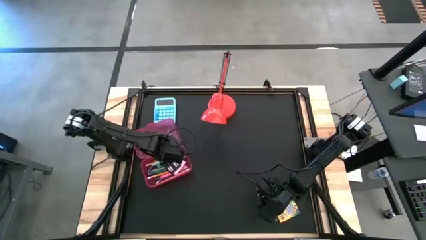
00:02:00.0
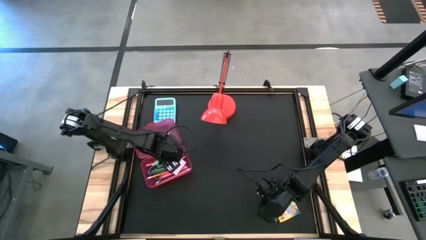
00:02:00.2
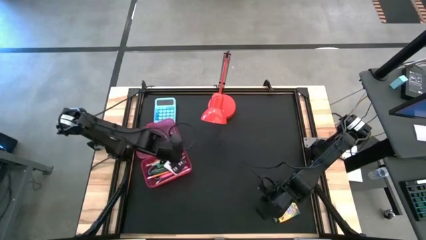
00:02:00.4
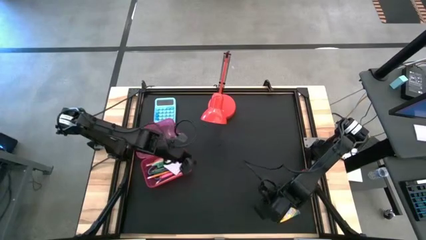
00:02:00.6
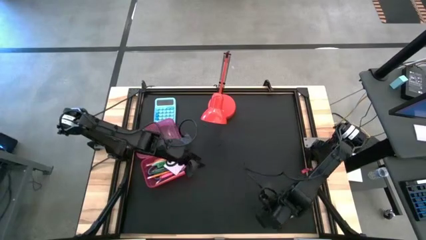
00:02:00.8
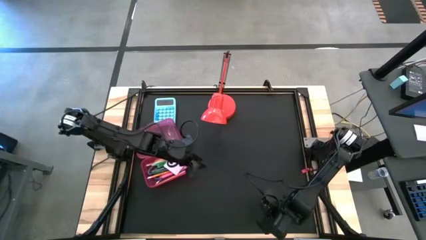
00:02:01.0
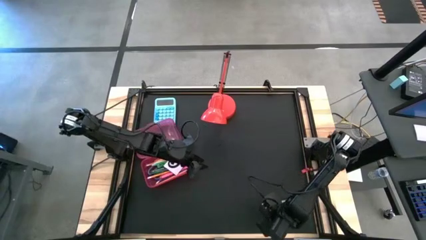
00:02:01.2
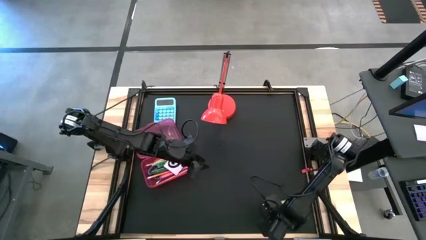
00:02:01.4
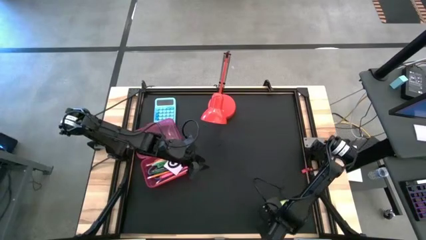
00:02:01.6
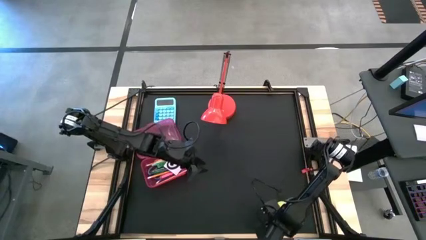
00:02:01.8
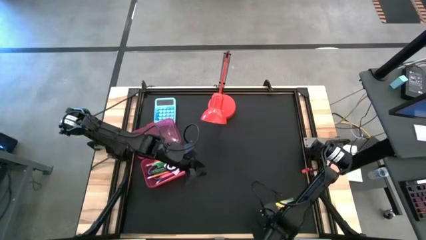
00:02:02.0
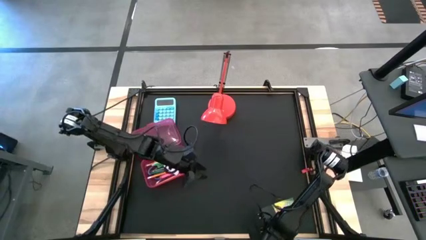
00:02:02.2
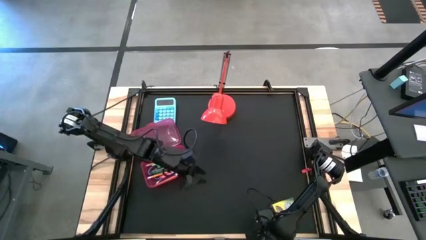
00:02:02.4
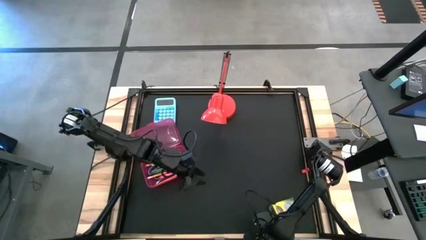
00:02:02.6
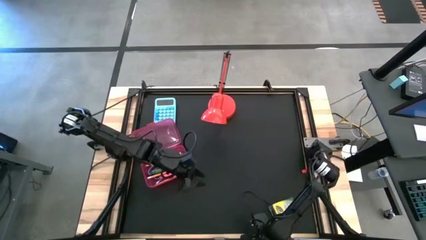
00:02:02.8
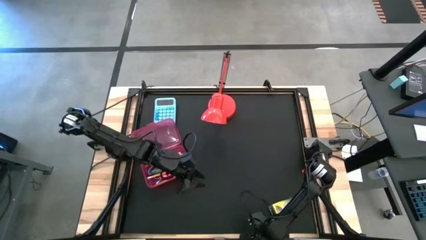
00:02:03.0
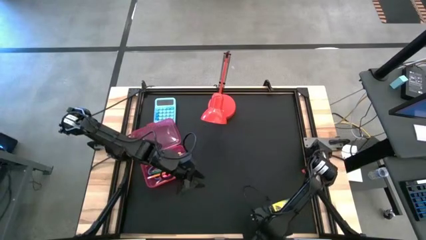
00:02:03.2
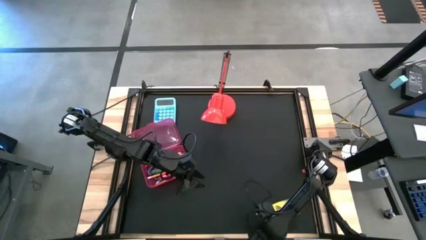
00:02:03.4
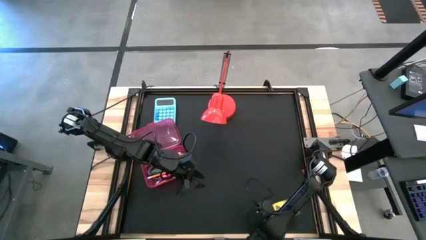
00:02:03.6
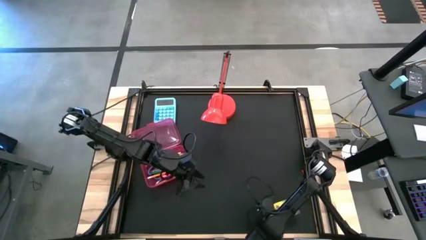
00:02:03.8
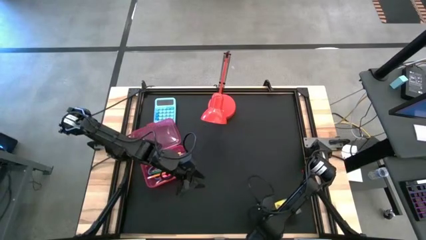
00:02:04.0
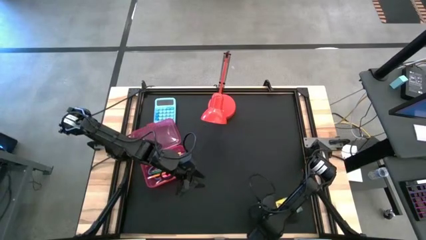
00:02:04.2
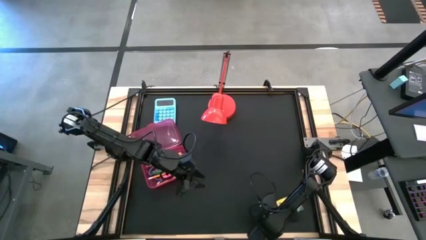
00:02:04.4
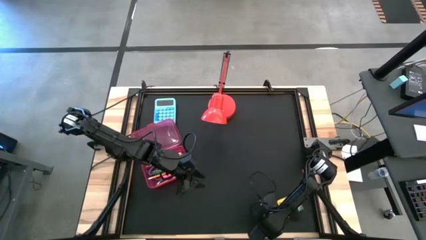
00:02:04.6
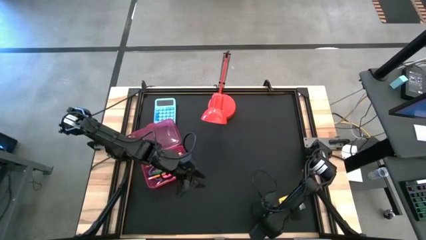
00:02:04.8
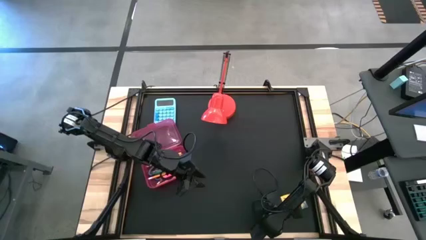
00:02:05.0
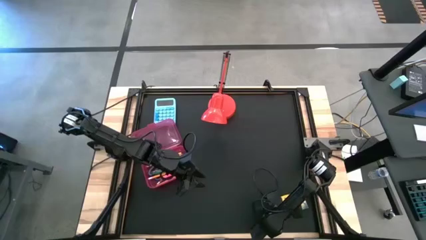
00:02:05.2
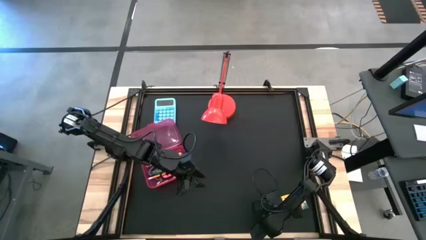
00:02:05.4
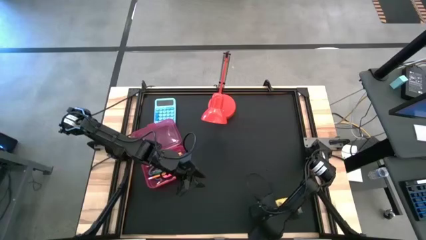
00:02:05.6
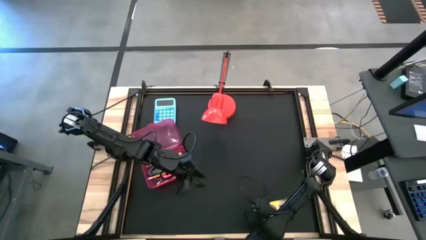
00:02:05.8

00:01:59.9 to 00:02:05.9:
Task: Pack school essentials
Put the yellow crayon box into the red supply box

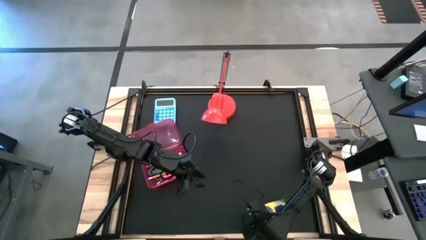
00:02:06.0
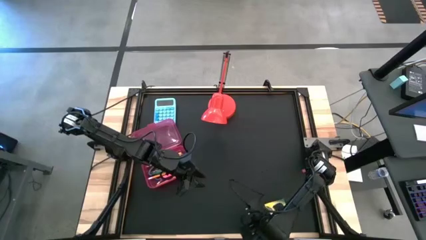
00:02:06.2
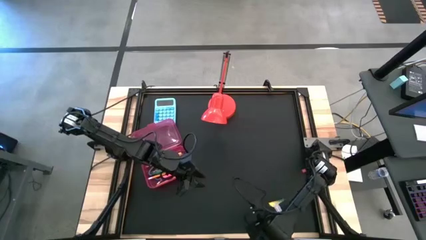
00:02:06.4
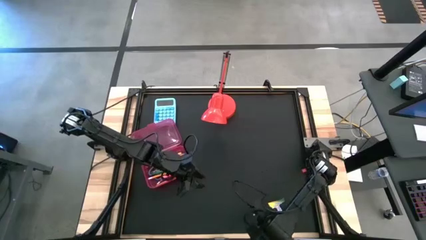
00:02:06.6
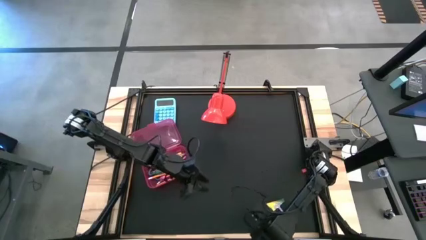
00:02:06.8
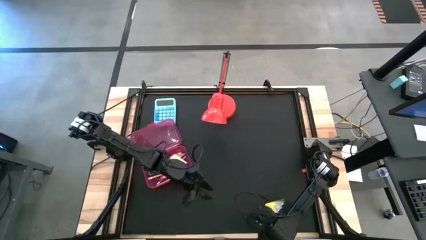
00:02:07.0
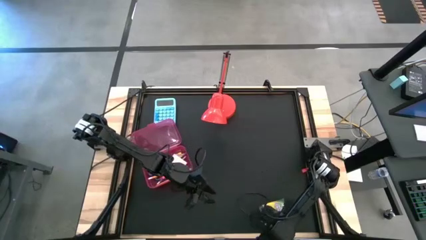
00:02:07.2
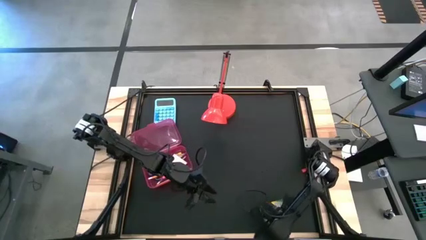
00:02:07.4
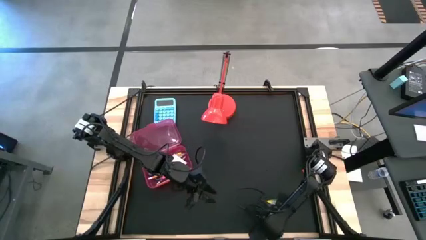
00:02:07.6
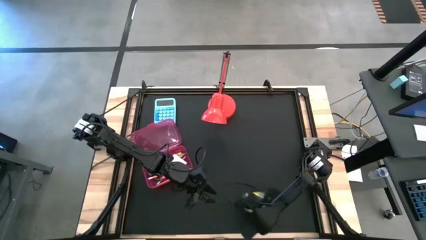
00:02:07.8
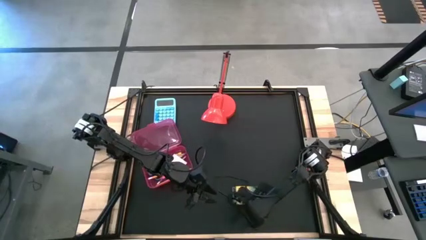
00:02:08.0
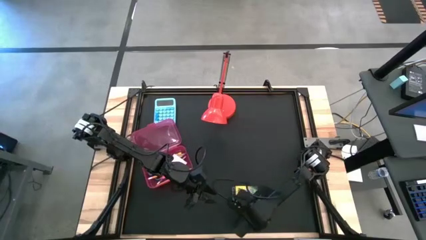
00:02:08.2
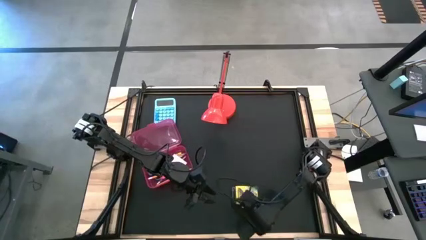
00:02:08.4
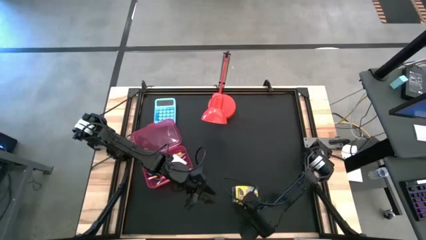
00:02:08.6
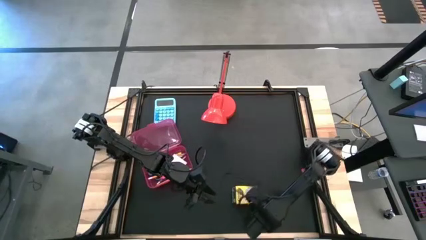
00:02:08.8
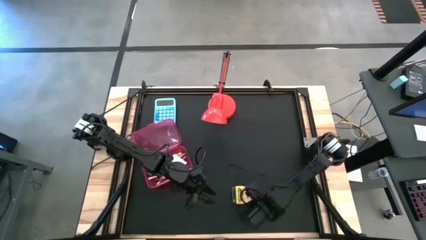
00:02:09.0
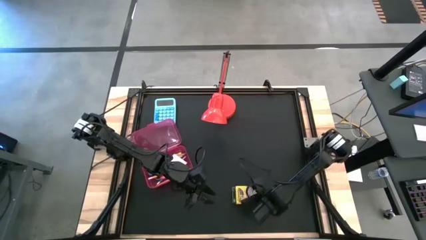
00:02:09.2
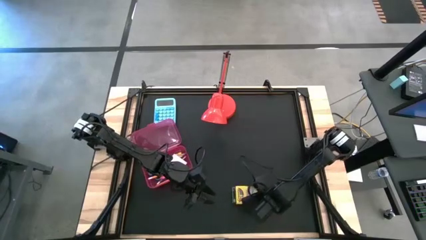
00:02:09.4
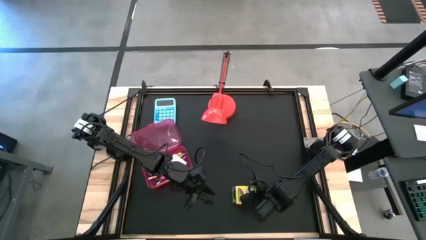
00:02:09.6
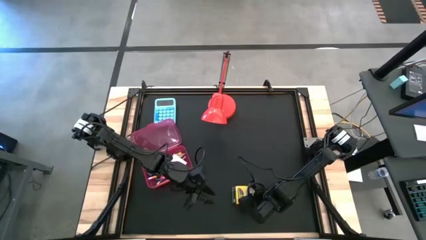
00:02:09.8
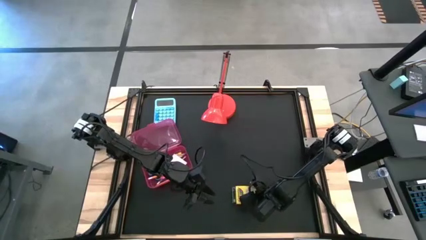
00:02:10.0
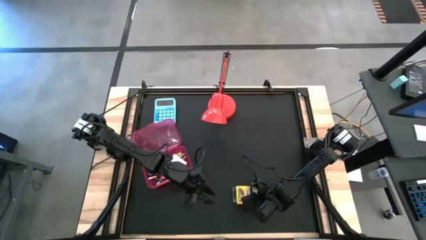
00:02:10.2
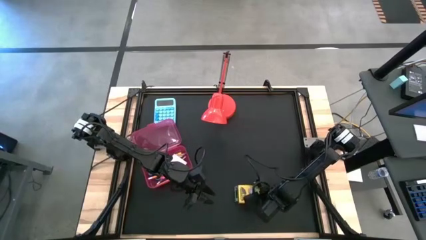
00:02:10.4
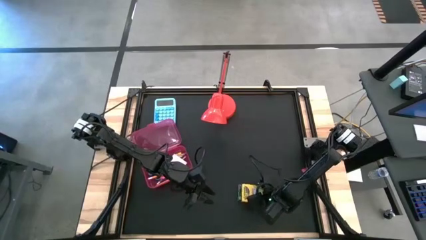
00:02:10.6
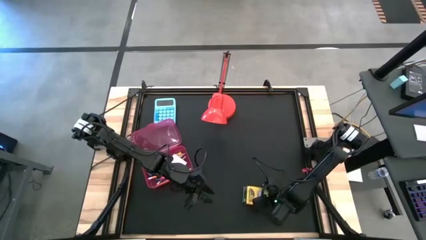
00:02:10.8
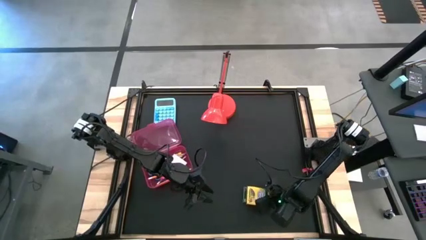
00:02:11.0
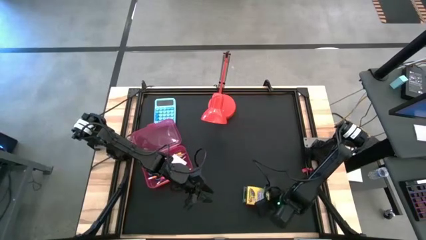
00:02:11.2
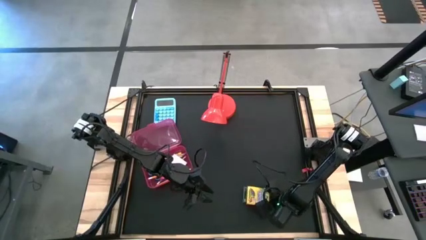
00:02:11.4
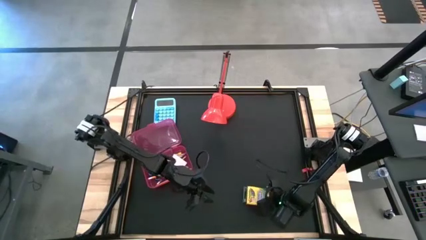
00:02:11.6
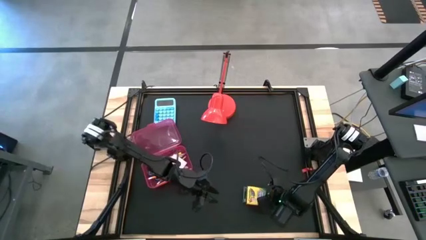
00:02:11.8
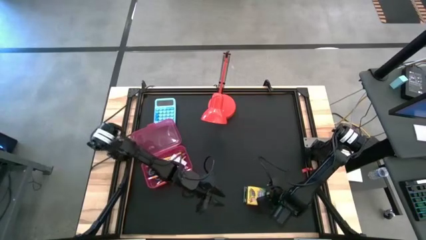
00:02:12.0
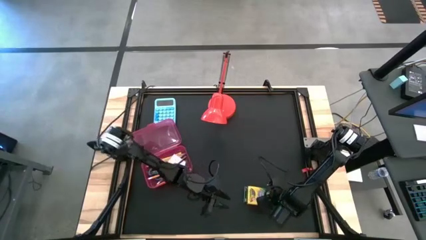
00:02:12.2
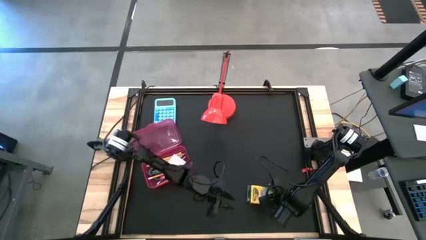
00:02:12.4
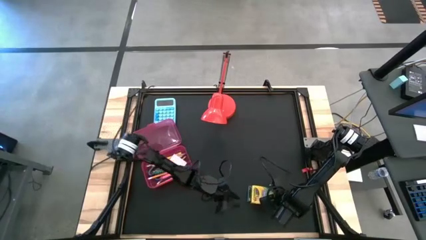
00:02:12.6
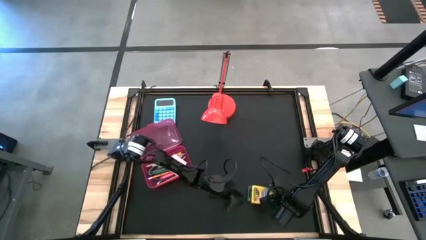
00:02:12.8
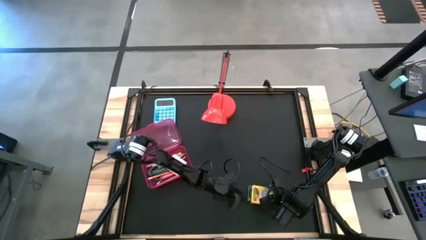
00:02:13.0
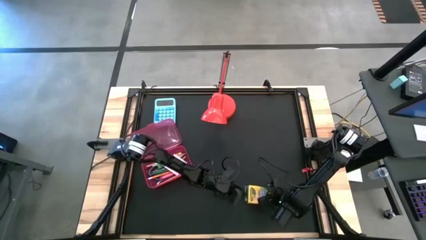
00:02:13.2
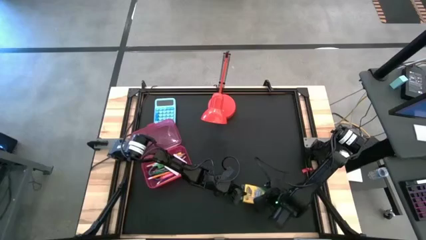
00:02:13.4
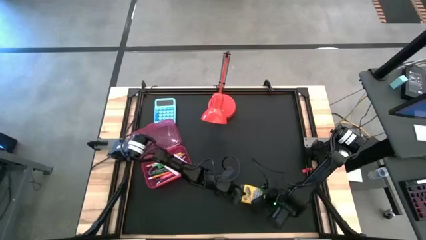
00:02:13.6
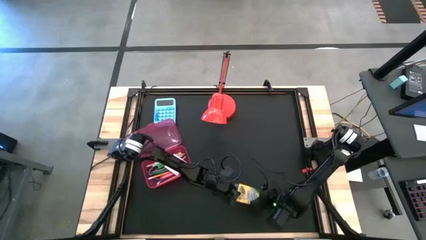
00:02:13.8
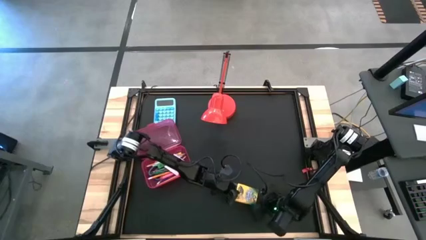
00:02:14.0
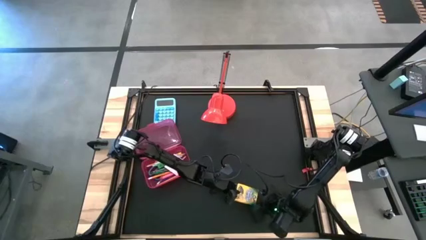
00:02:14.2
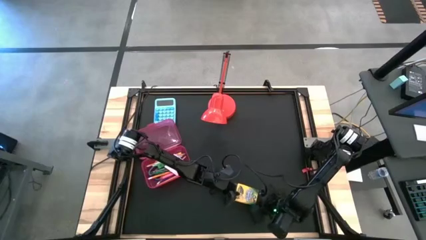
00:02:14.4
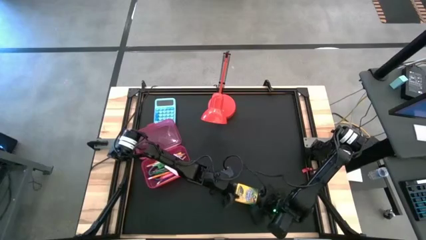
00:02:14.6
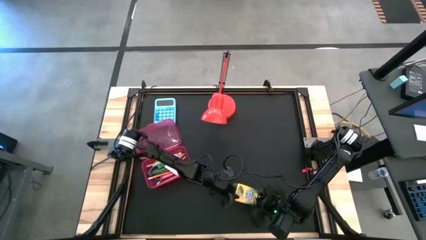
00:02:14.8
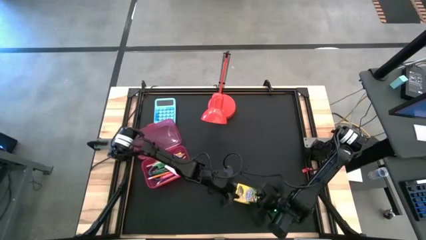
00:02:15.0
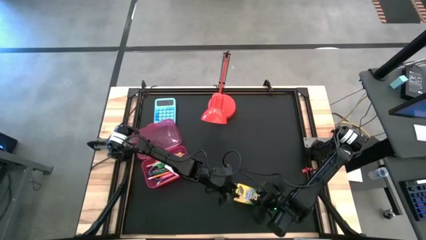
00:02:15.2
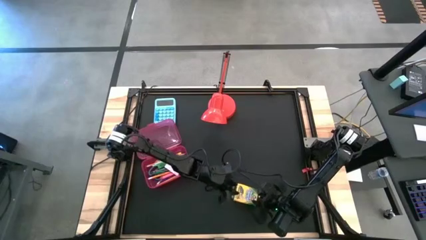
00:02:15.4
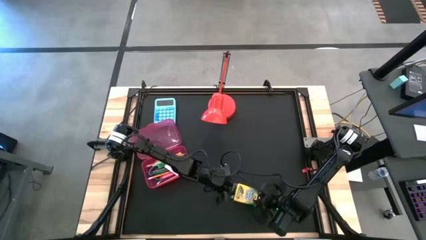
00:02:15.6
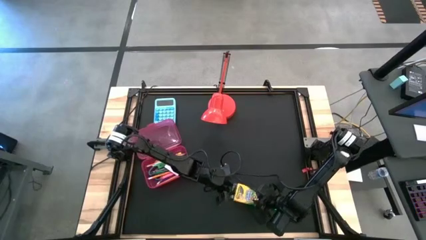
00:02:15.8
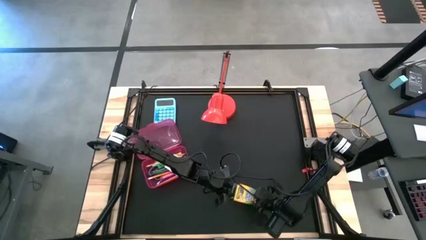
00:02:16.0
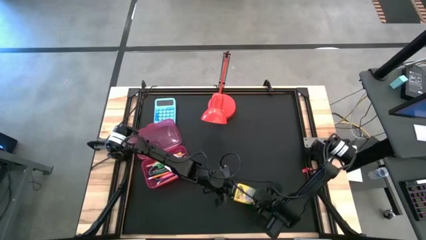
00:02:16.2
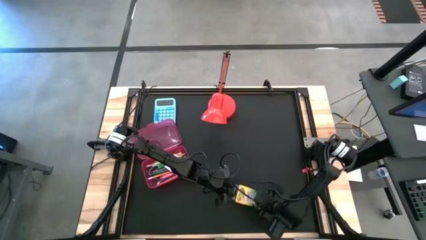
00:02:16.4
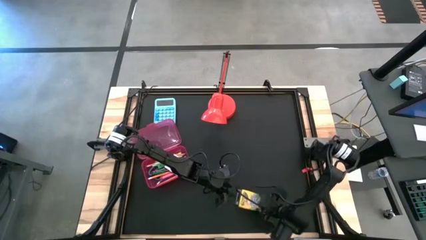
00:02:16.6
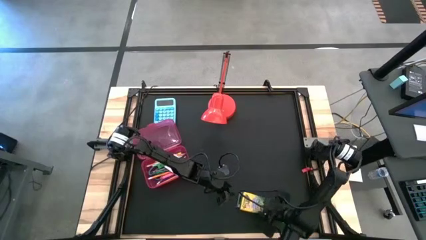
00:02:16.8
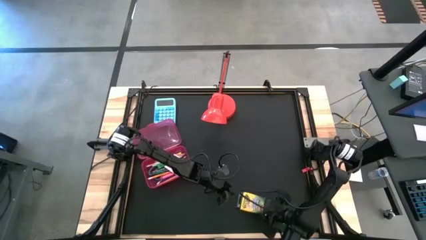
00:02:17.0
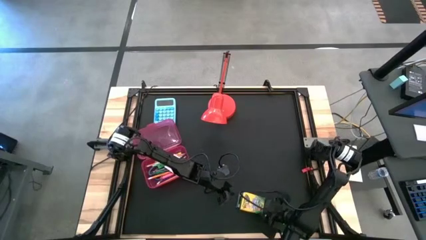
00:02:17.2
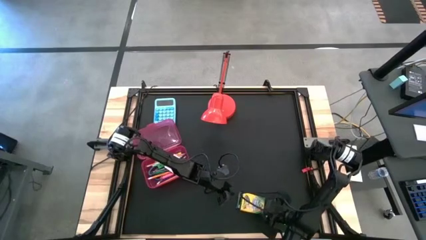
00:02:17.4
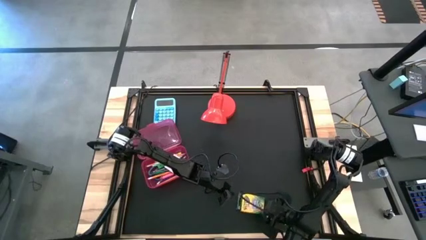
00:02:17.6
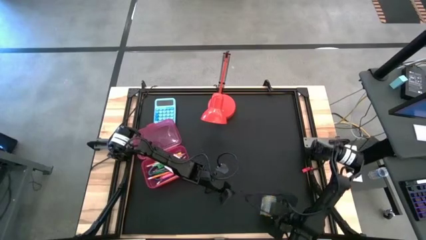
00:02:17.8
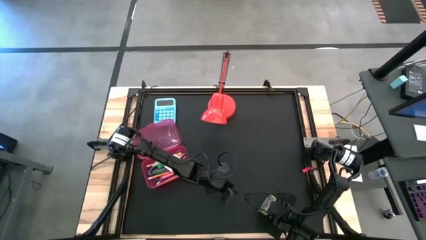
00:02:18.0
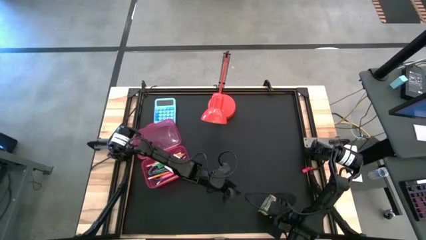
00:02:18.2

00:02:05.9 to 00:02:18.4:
Put the yellow crayon box into the red supply box
